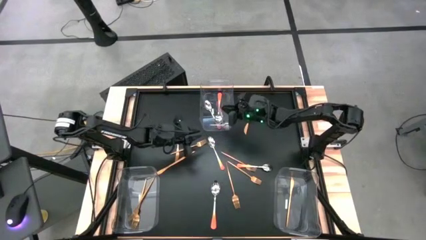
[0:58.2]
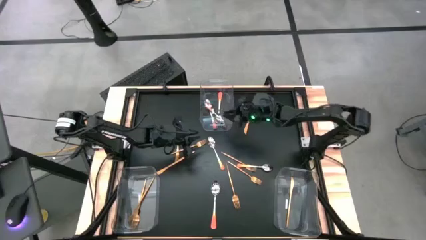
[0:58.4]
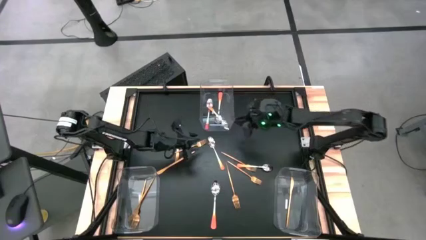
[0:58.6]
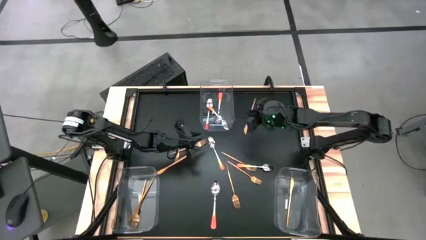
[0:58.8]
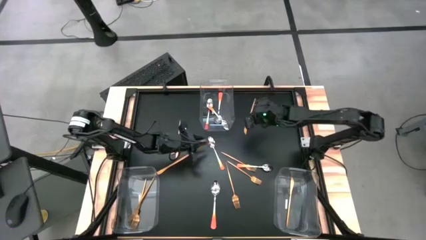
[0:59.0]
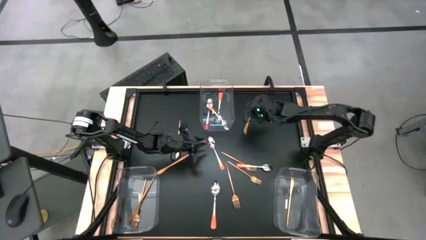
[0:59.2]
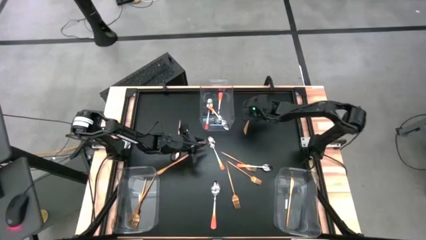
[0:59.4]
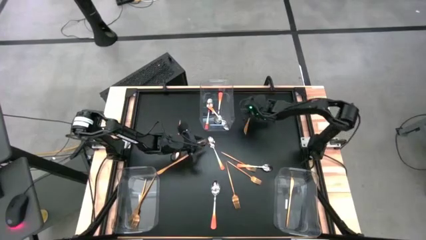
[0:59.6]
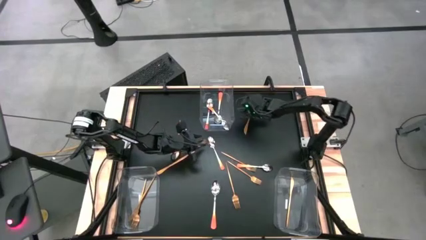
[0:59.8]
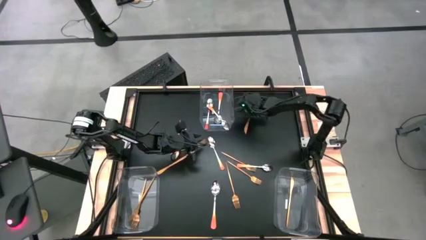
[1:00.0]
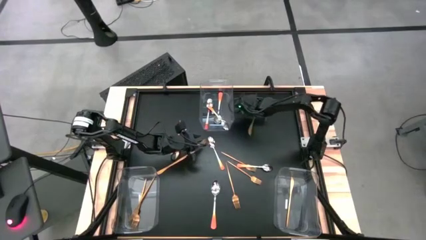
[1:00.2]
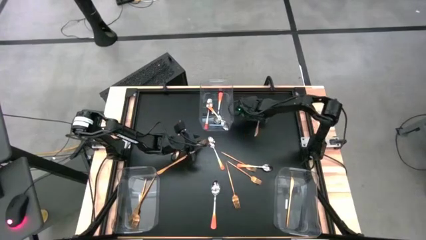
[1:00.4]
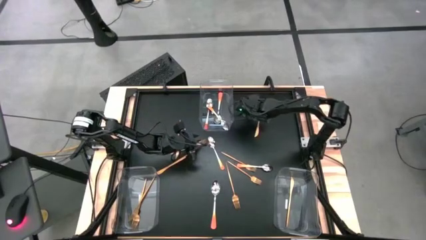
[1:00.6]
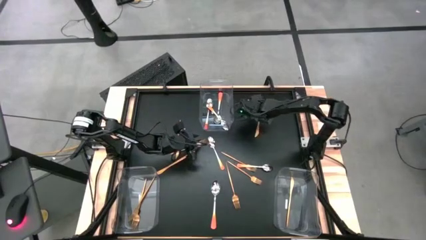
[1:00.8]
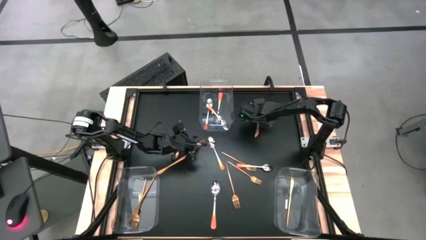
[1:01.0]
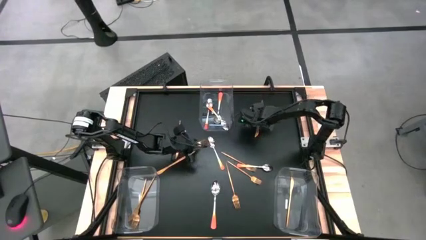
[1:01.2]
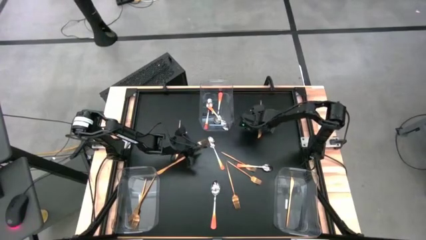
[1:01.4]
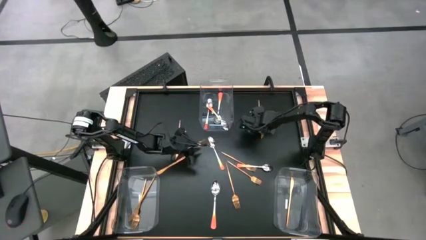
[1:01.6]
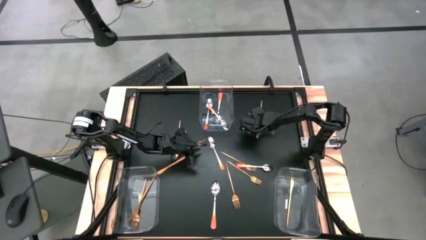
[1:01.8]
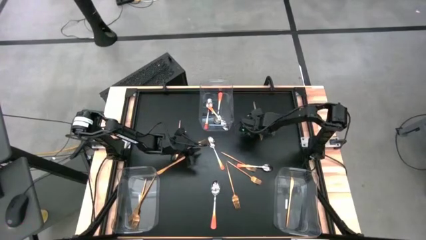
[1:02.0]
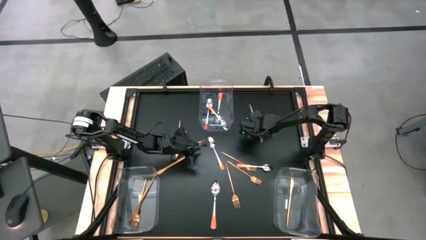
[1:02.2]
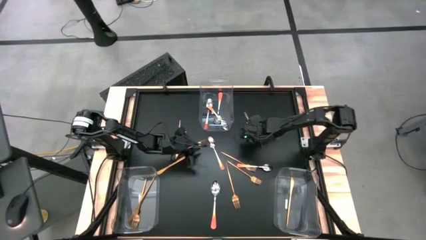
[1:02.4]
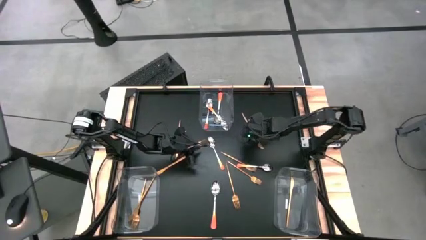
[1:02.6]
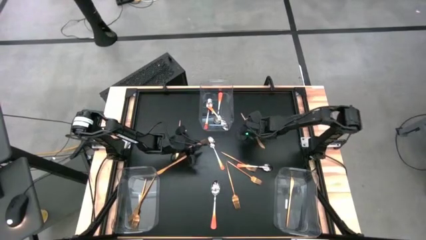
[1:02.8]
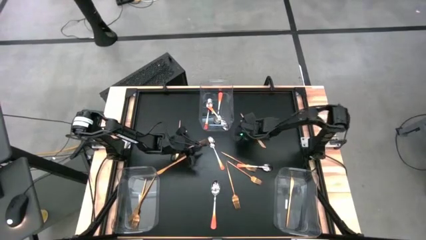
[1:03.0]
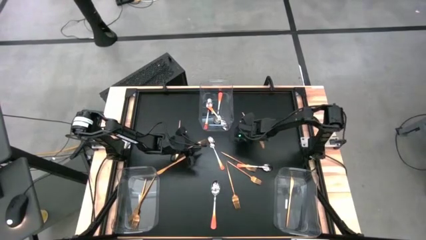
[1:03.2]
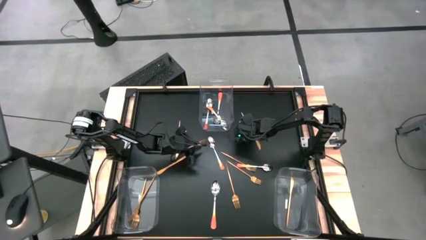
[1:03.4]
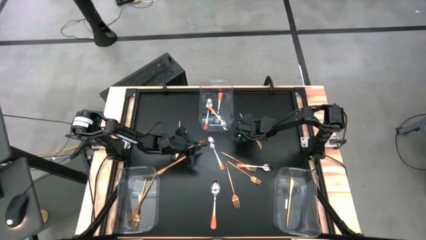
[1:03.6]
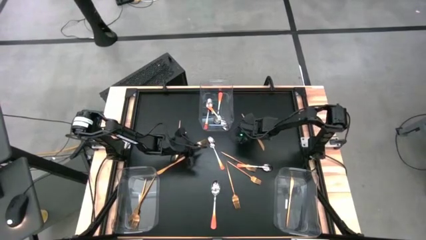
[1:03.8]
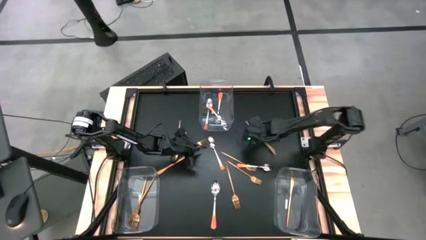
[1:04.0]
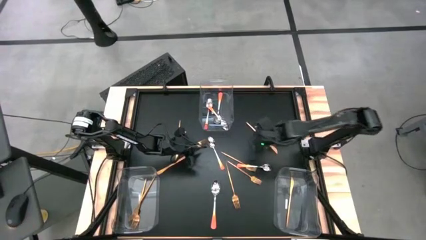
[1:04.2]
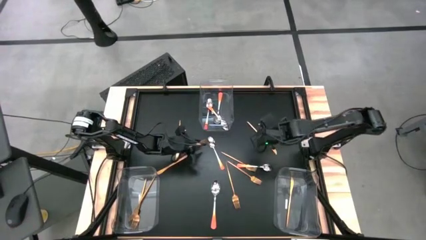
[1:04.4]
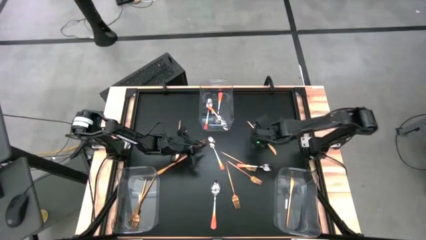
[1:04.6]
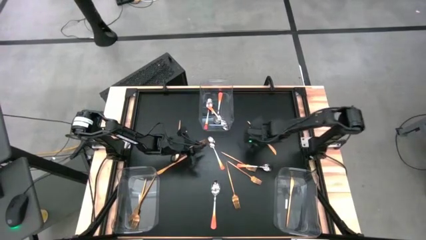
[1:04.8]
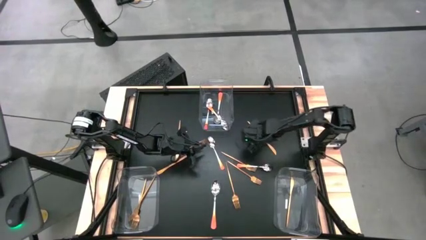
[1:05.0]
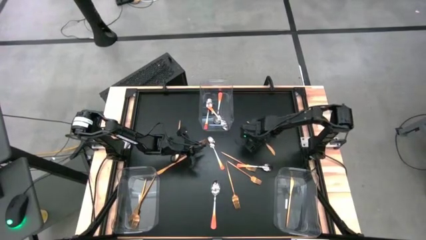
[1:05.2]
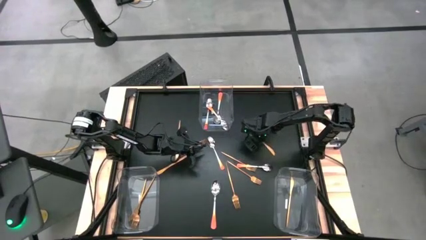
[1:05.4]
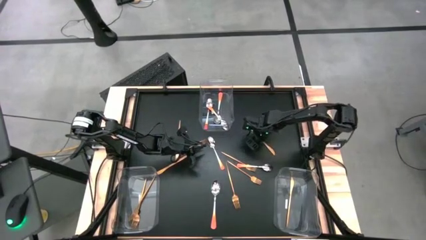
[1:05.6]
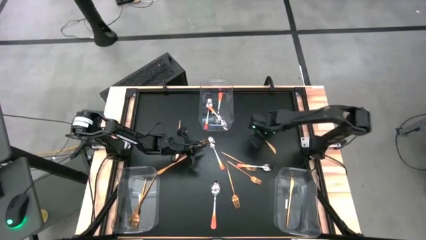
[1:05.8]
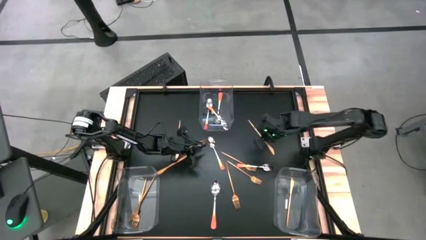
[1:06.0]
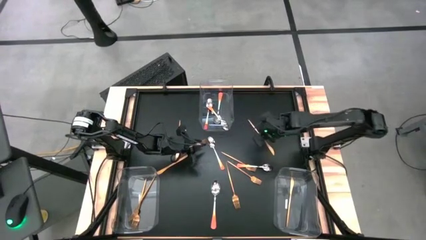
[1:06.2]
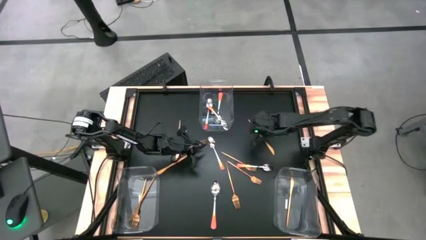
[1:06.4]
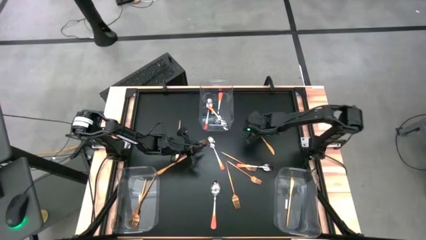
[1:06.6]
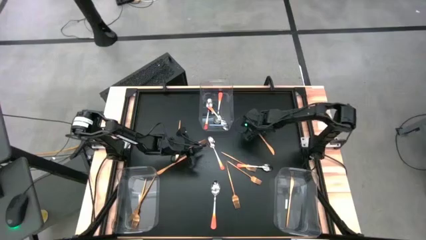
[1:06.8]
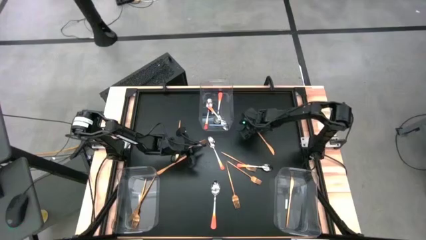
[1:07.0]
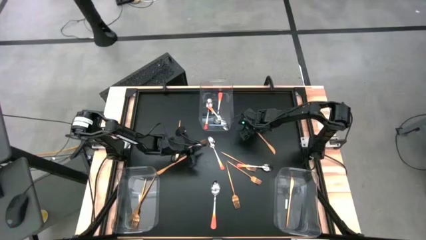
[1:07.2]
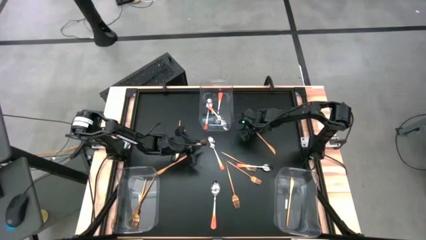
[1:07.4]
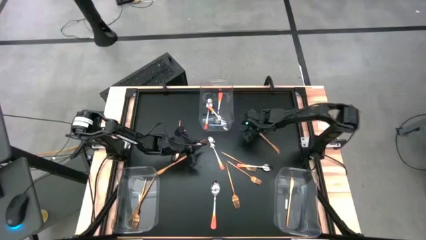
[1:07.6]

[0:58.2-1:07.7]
Task: Sort silverware by color (type)
Put the gold knife into the bottom right transparent bin

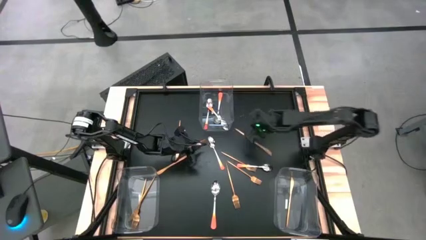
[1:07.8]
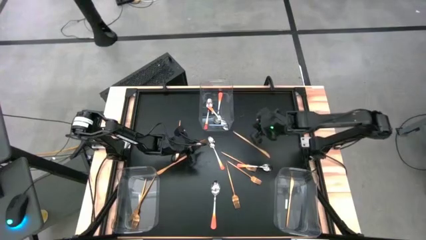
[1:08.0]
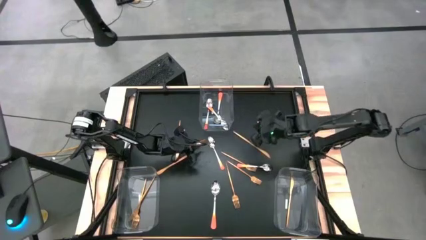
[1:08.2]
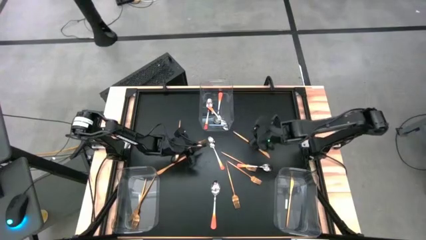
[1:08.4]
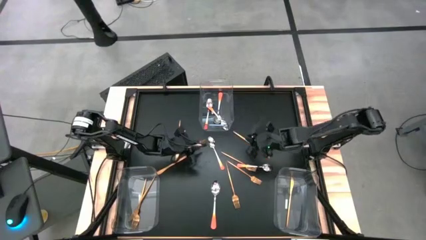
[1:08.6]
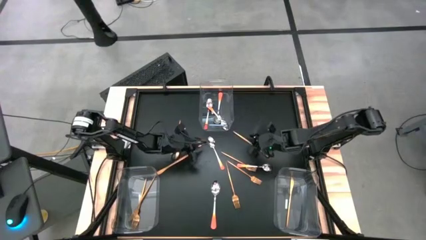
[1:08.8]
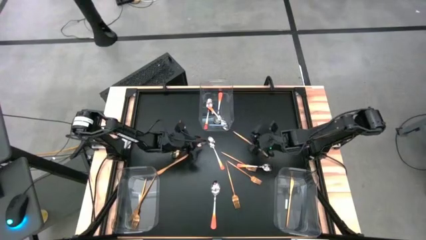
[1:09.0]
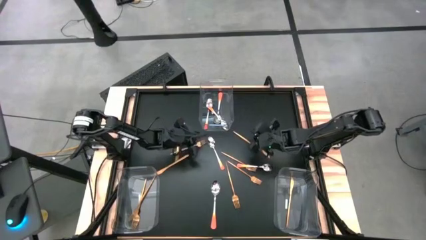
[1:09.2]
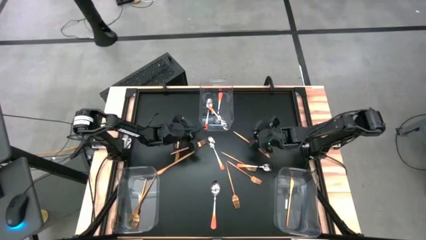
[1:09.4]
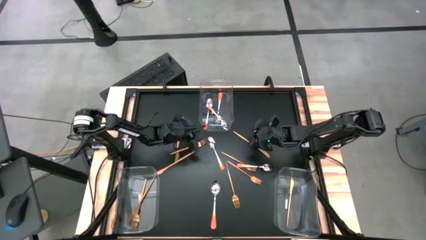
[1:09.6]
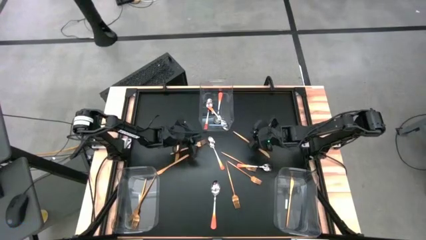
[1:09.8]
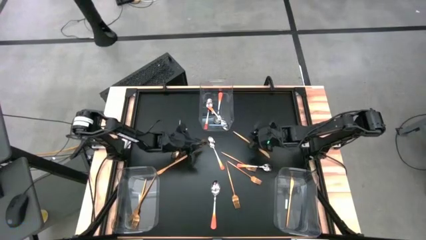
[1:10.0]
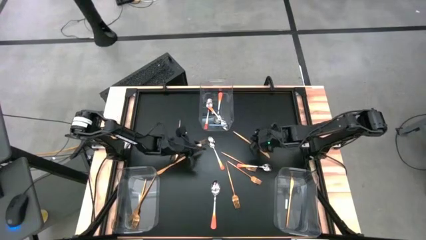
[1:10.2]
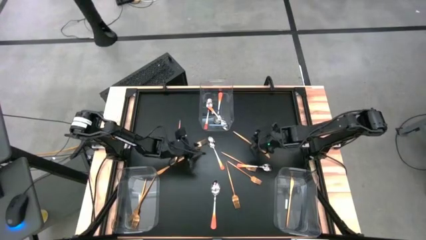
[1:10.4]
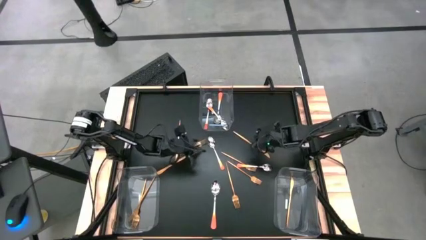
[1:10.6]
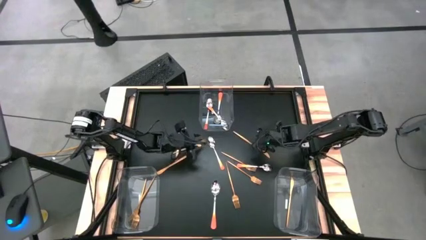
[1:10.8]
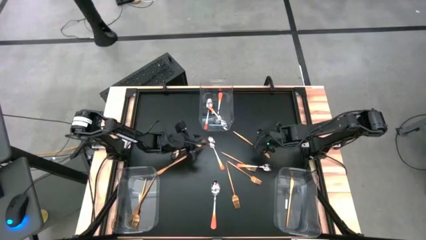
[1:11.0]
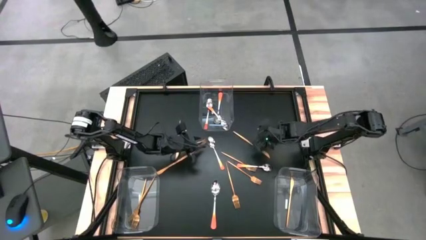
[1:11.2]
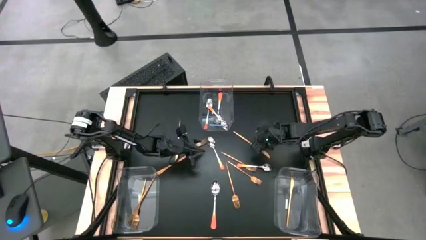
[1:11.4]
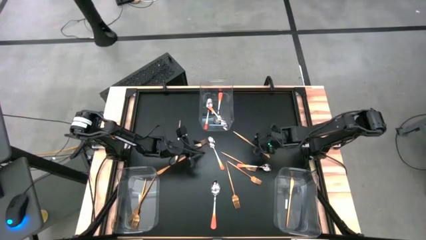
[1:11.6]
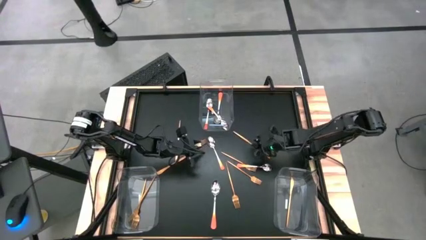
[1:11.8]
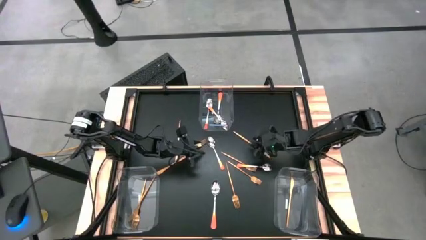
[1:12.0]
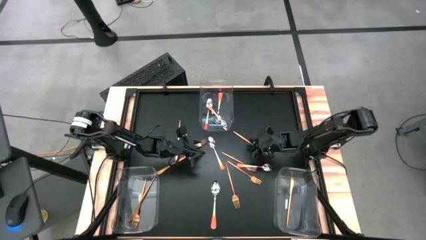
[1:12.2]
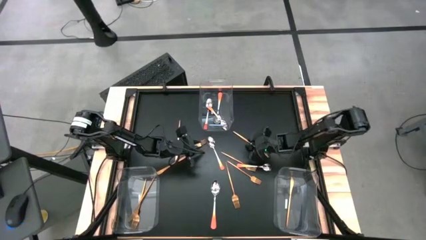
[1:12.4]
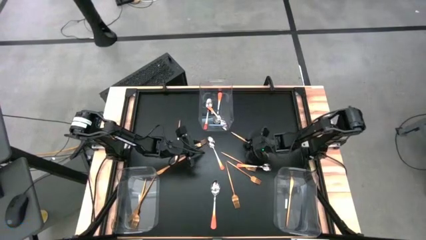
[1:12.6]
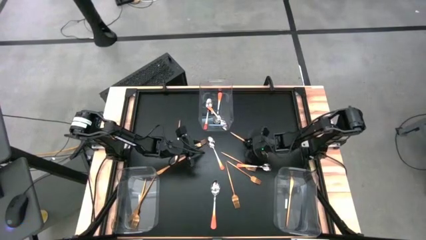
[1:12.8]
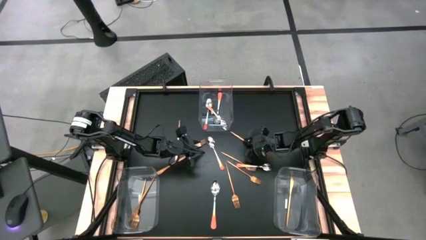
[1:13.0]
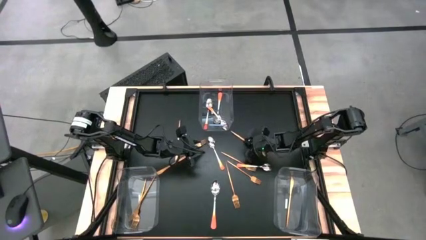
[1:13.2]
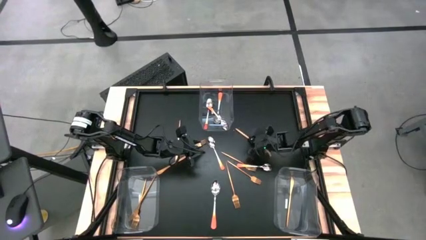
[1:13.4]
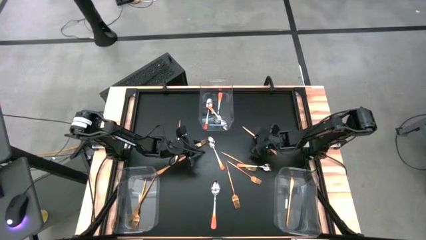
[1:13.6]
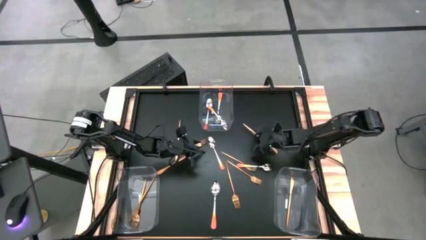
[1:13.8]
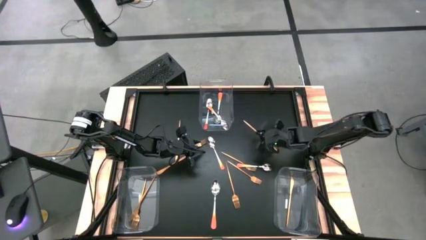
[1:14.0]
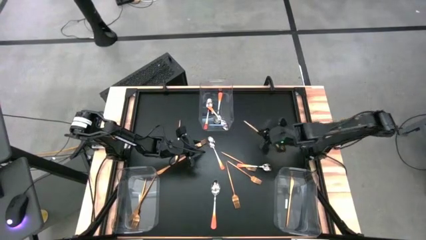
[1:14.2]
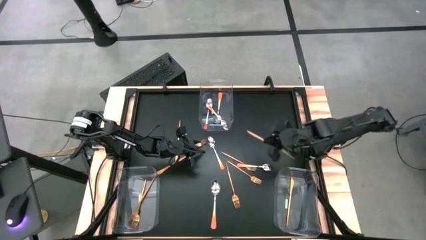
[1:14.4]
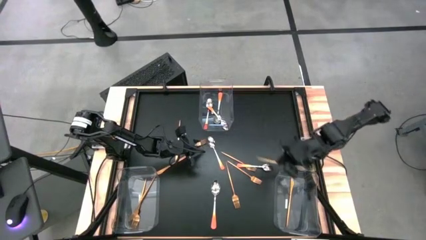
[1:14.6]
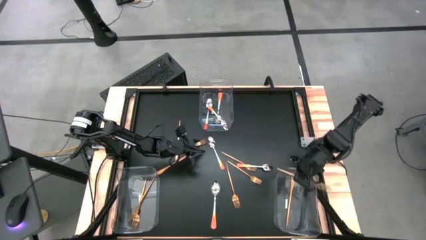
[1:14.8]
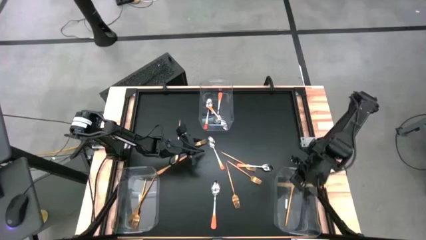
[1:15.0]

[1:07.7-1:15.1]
Put the gold knife into the bottom right transparent bin
